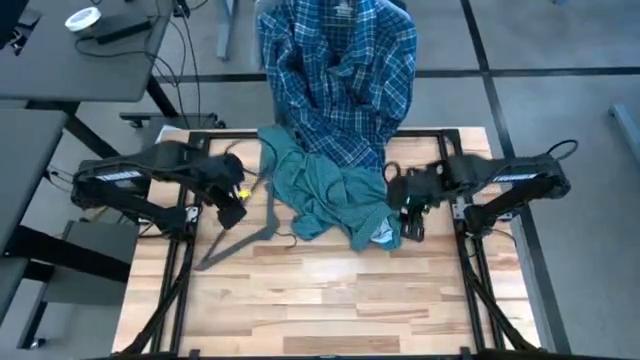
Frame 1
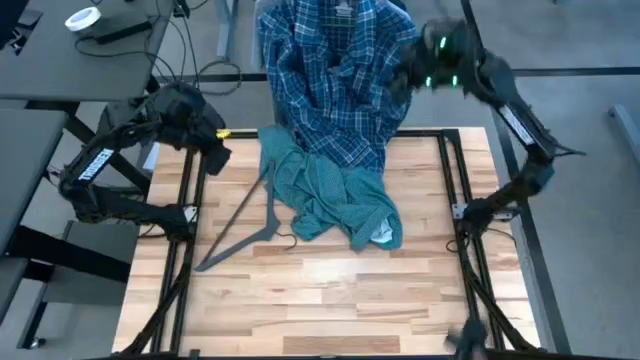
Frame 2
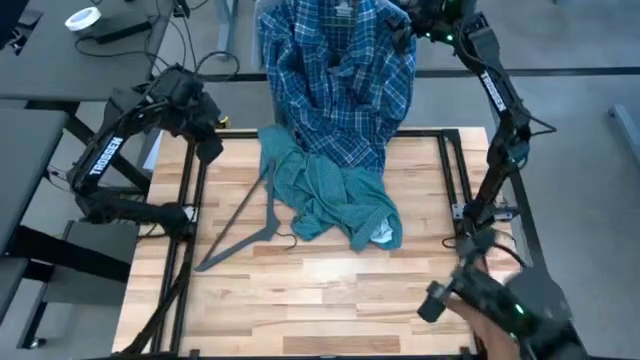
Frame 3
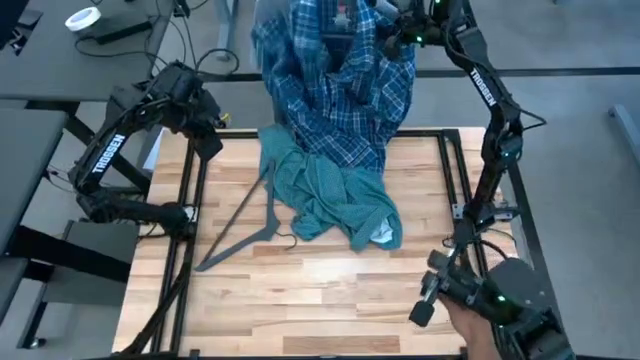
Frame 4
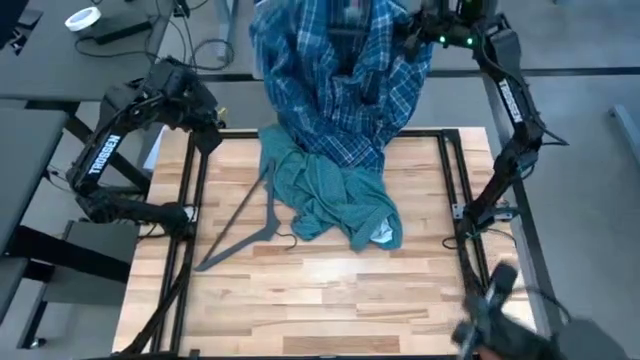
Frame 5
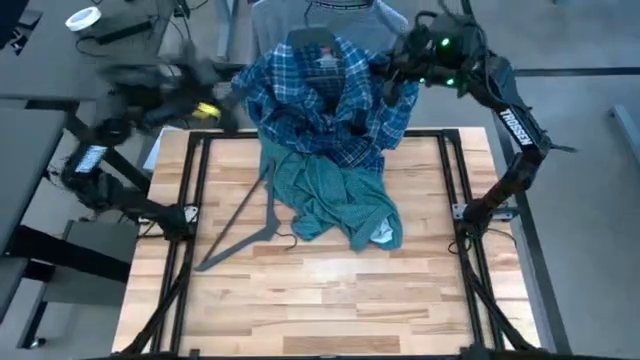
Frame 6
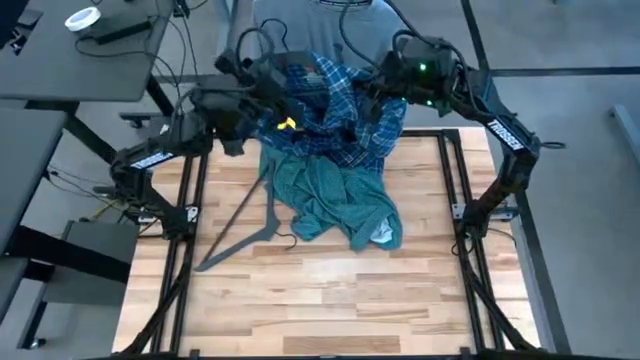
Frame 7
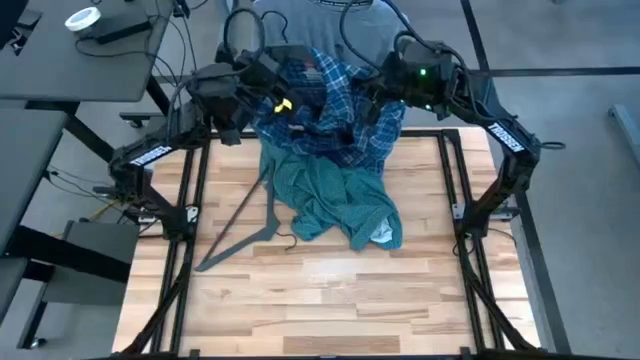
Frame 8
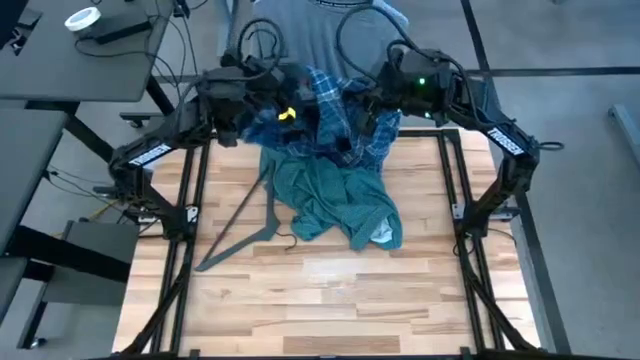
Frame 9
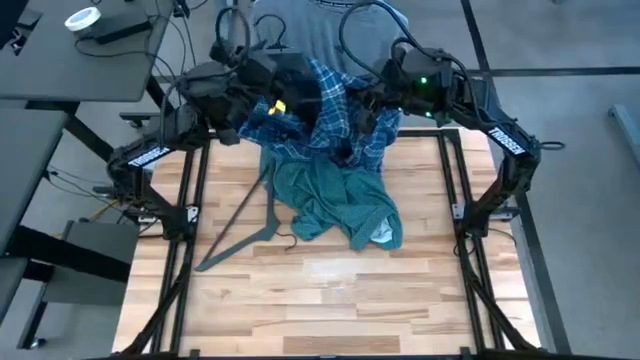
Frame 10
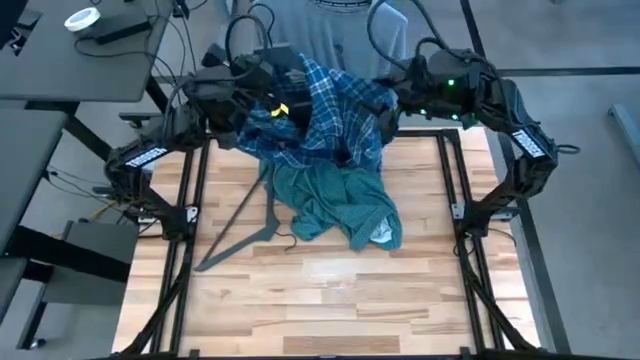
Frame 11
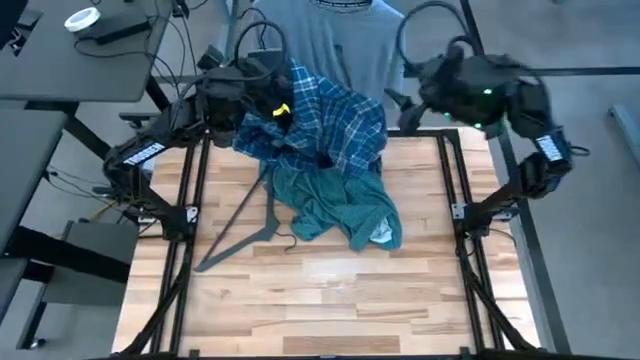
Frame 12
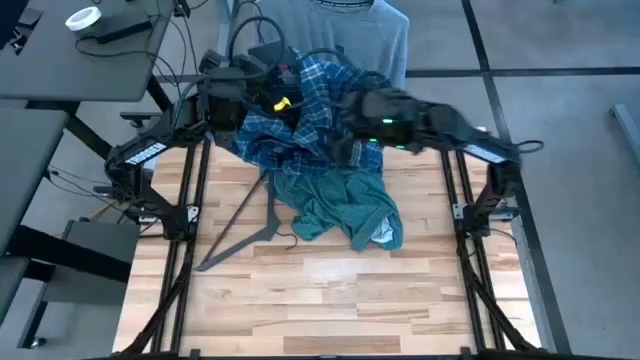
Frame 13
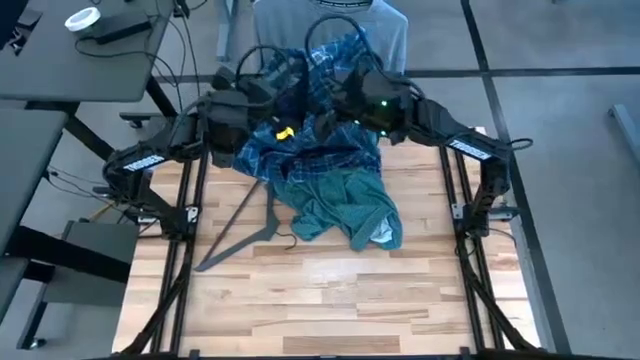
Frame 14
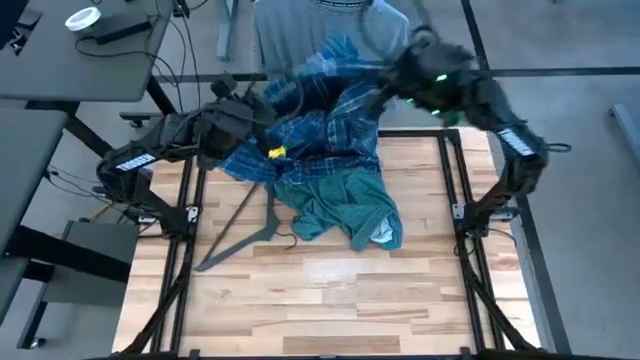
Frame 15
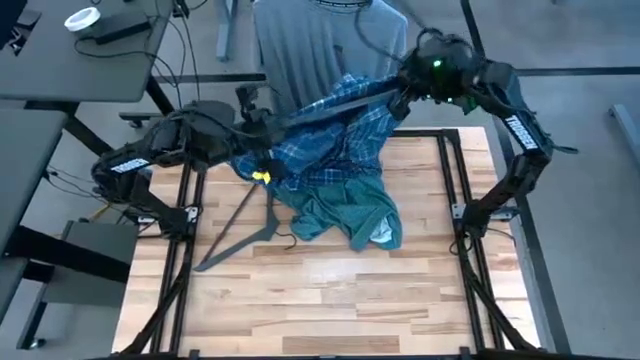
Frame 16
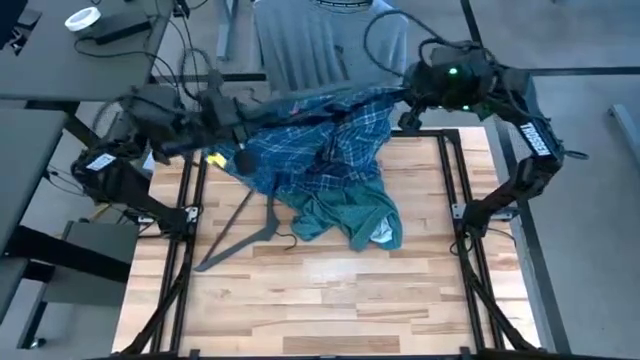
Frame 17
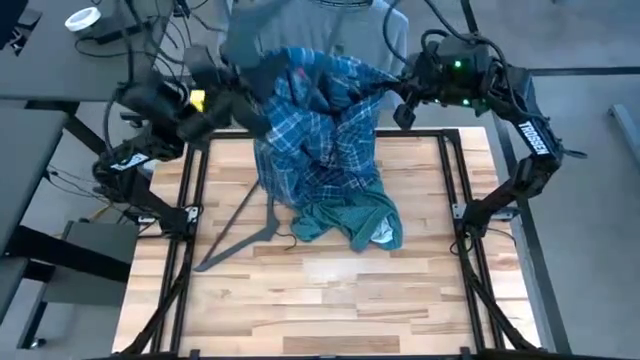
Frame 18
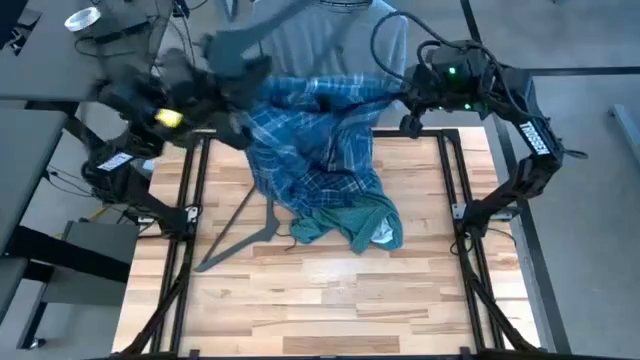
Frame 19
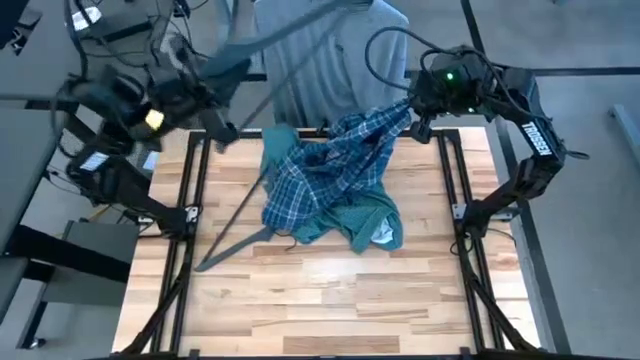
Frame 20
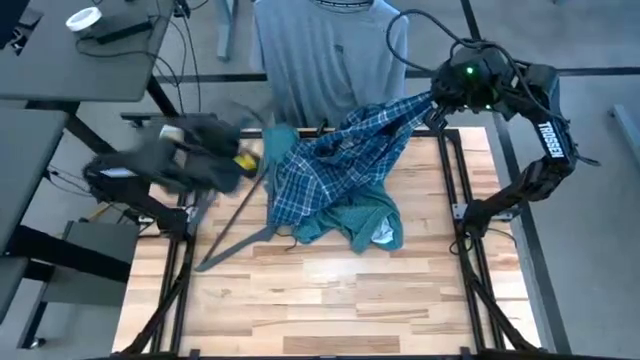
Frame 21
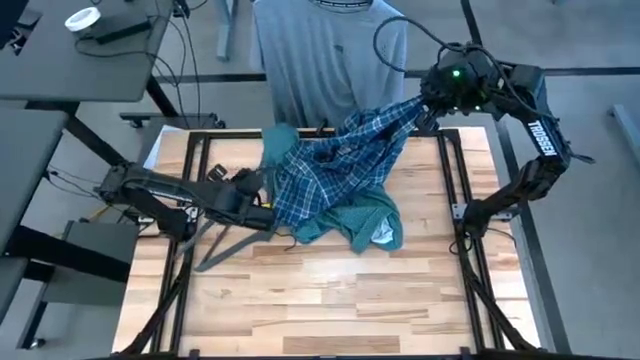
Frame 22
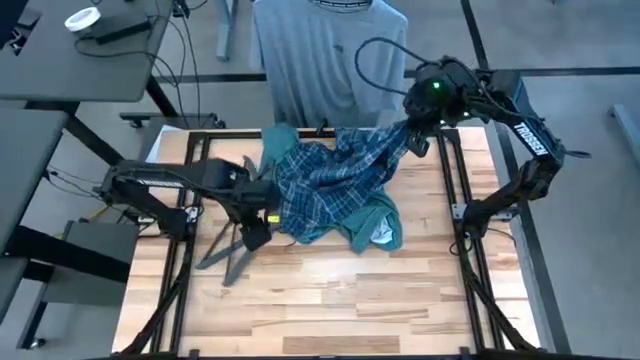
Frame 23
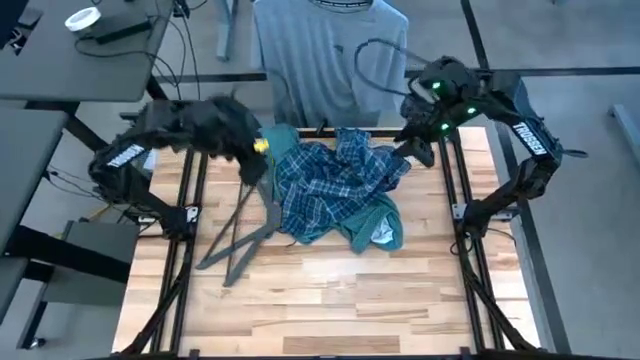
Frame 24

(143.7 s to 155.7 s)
Task: Hang clothes
Unhang the blue polo shirt from the hanger rack

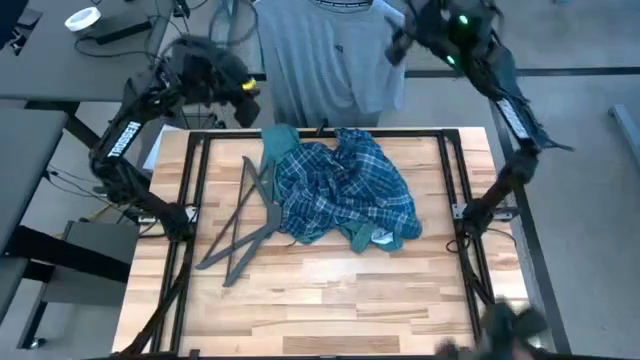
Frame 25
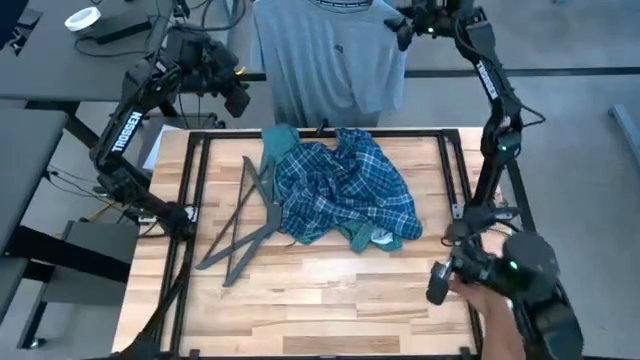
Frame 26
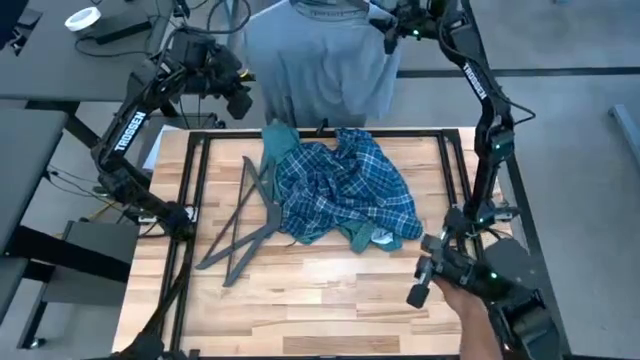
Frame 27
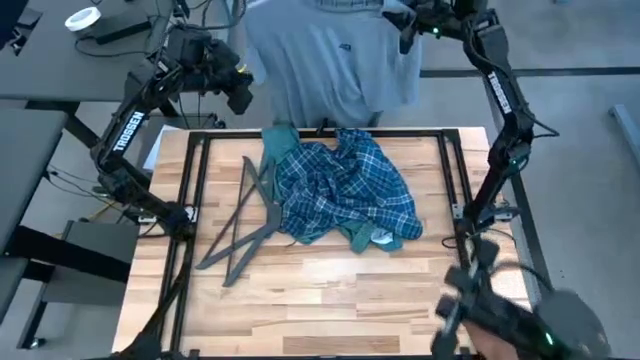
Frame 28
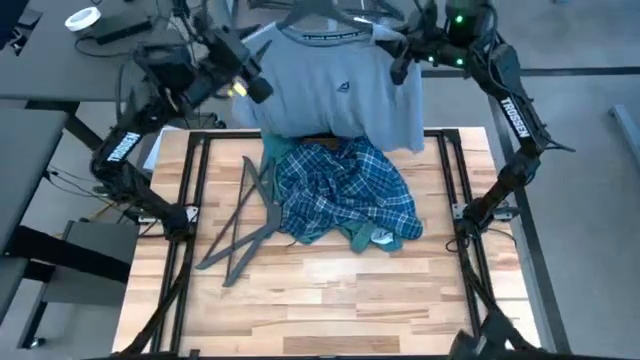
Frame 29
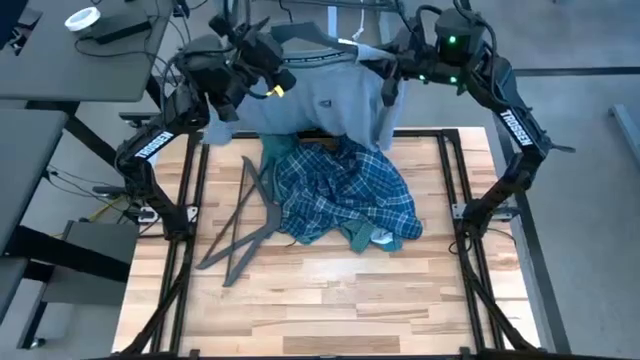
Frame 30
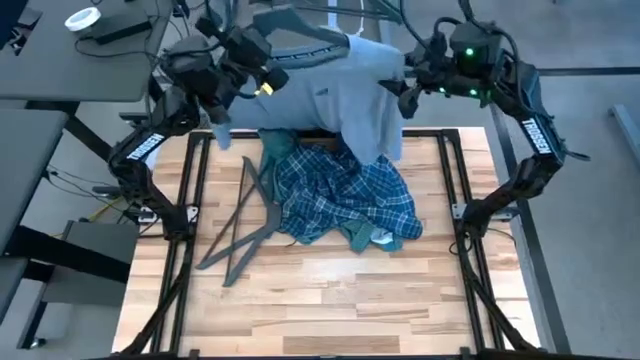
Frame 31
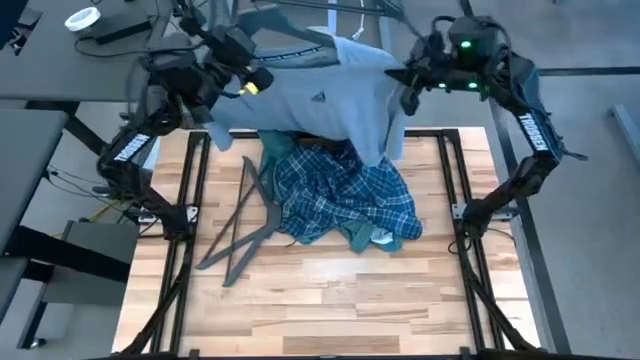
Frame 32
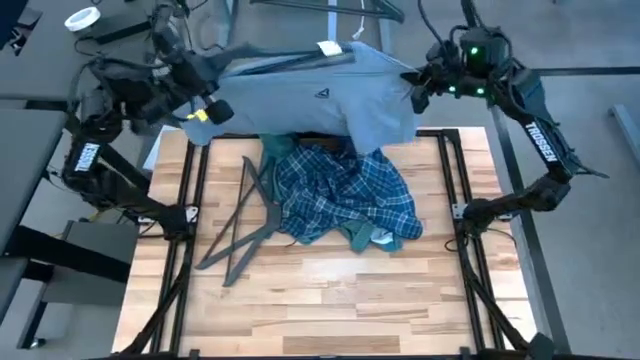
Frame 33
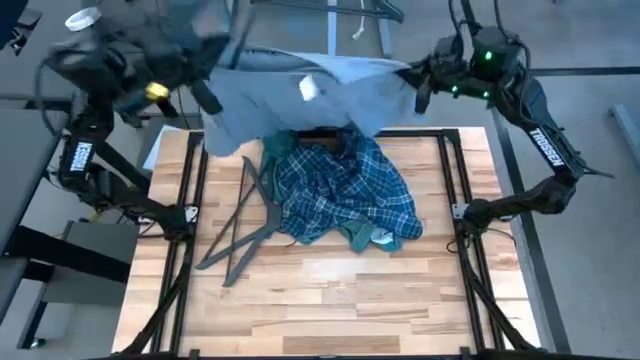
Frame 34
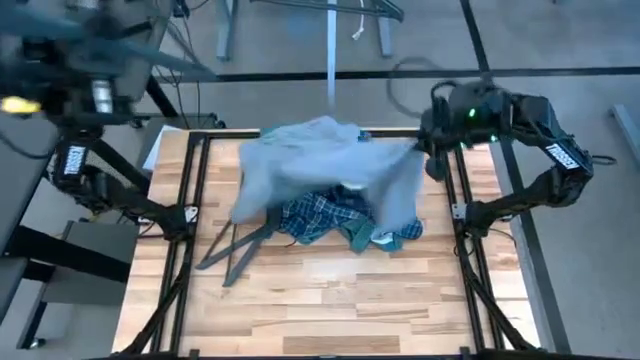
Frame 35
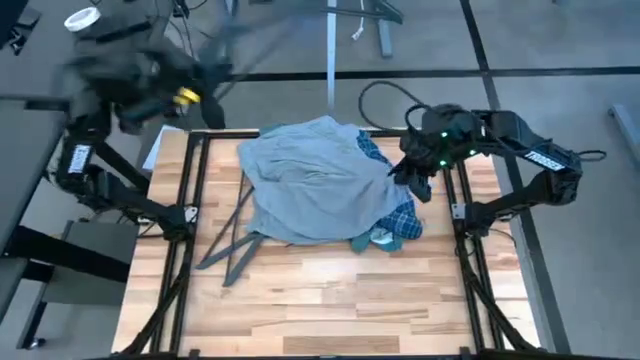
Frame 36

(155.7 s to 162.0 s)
Unhang the gray t-shirt from the hanger rack

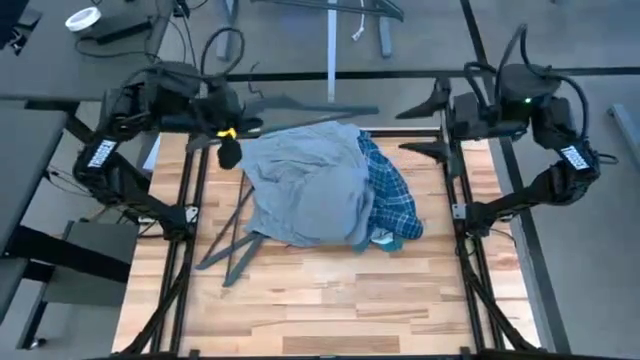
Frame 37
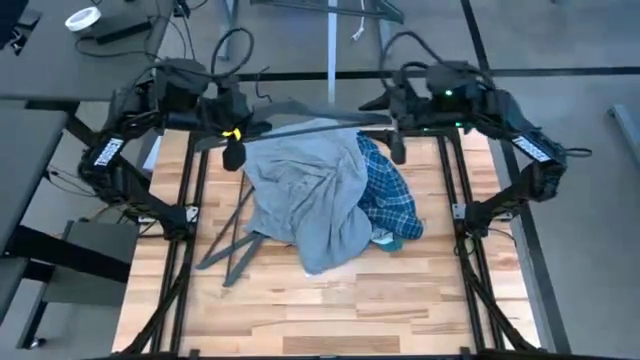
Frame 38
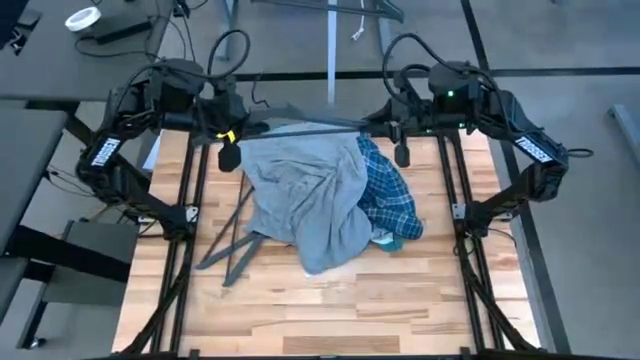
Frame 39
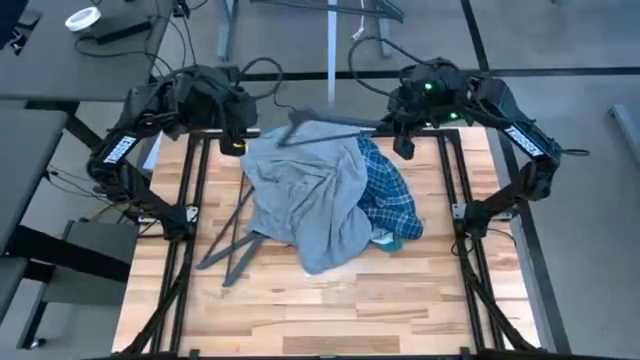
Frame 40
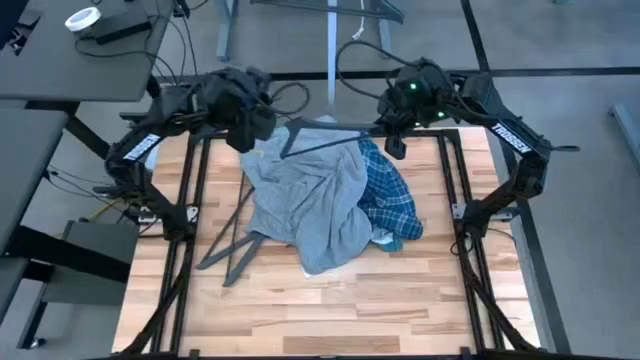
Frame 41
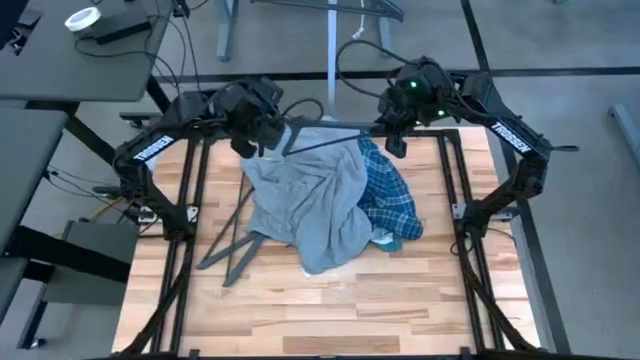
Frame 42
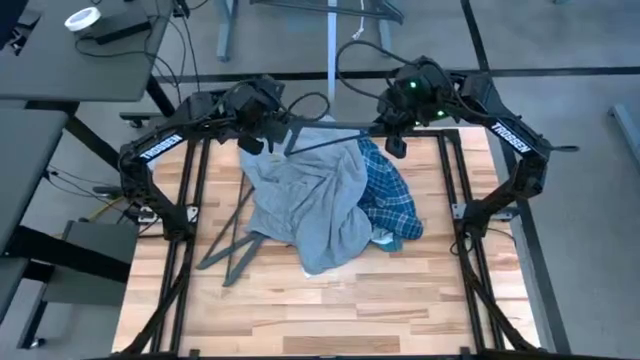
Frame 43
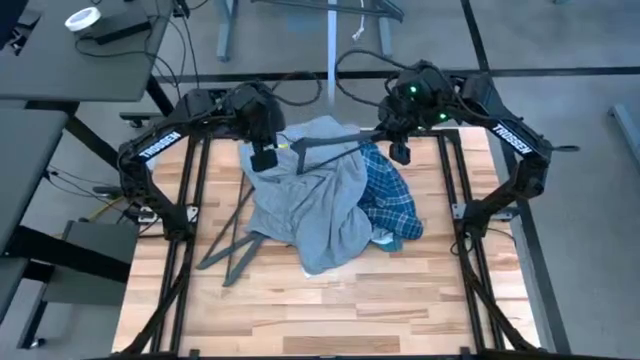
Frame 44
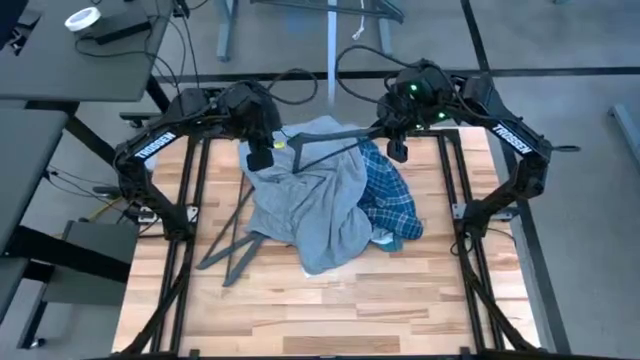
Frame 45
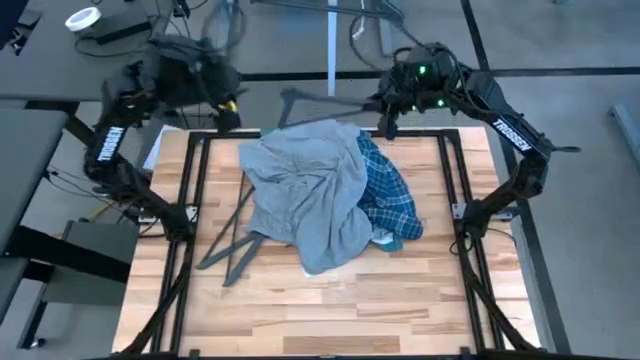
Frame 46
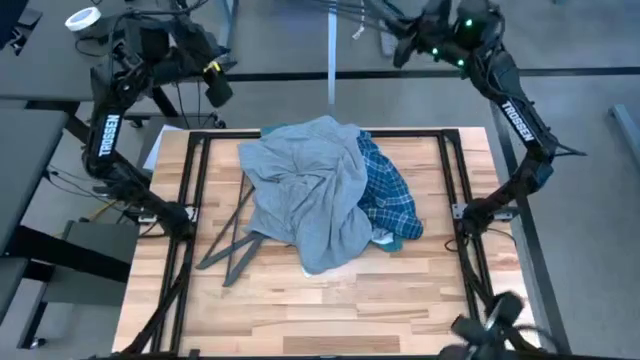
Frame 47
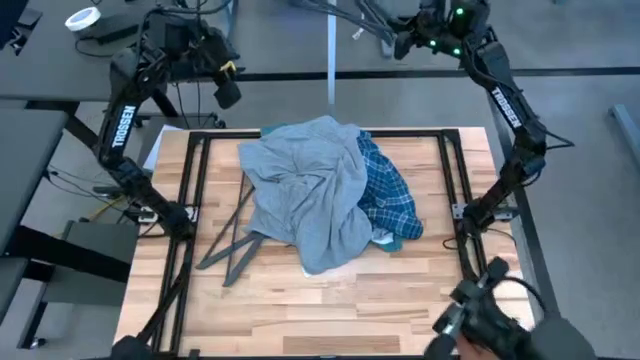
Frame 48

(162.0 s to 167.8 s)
Hang the gray hanger on the hanger rack
